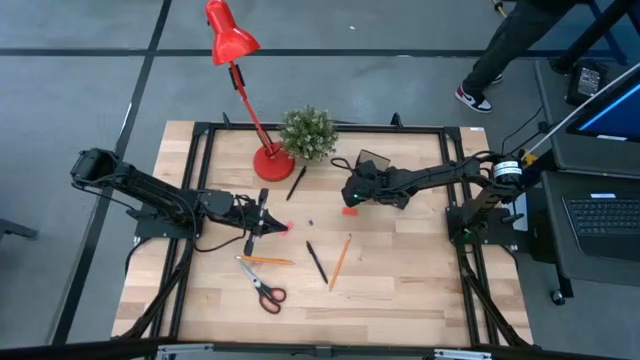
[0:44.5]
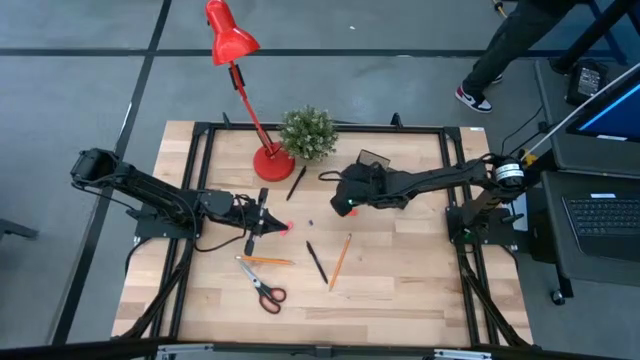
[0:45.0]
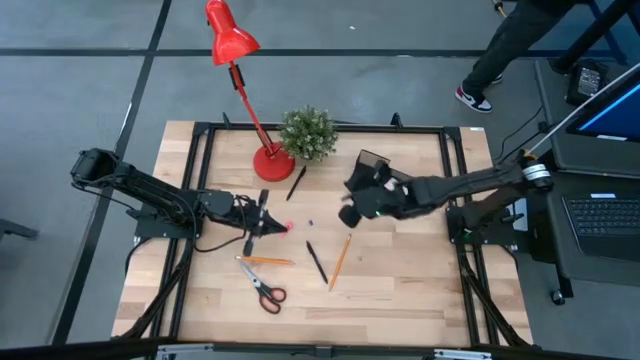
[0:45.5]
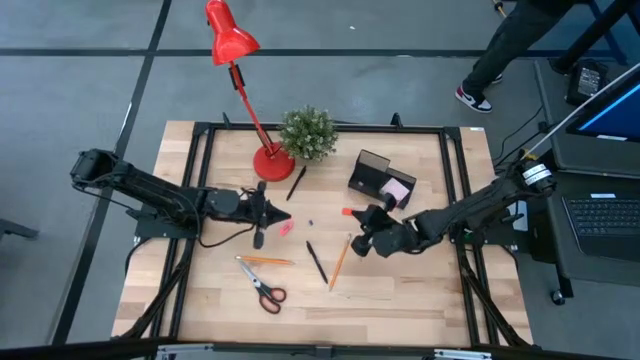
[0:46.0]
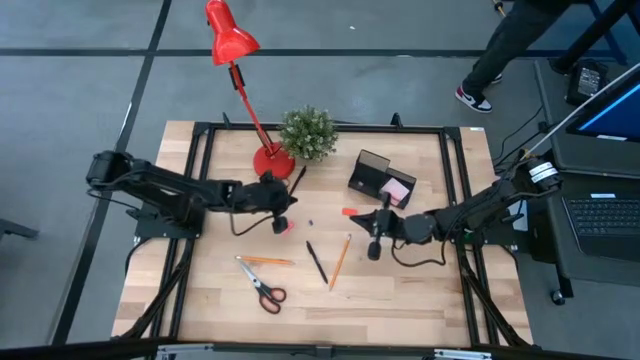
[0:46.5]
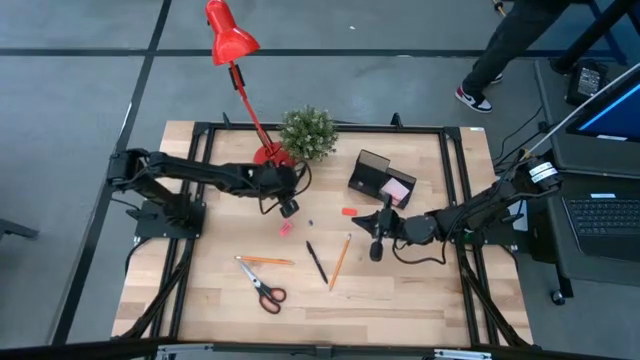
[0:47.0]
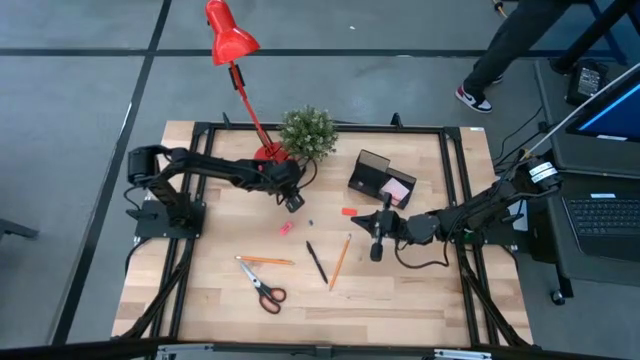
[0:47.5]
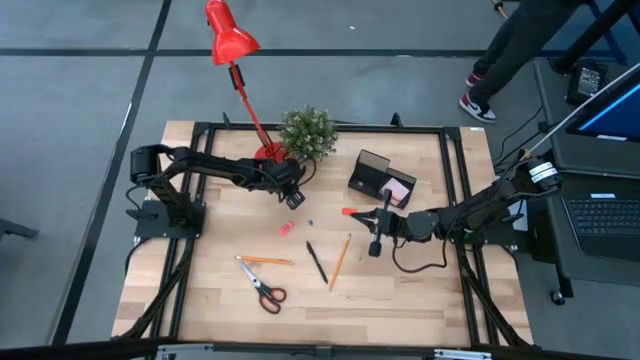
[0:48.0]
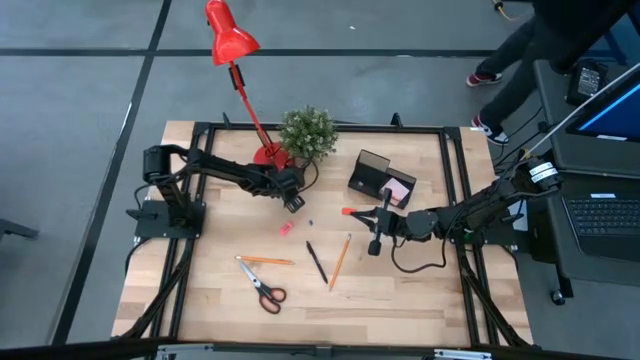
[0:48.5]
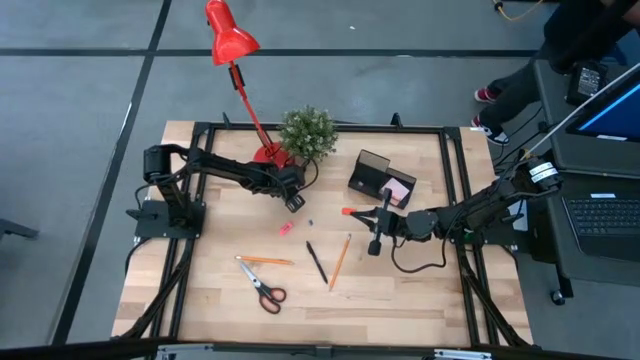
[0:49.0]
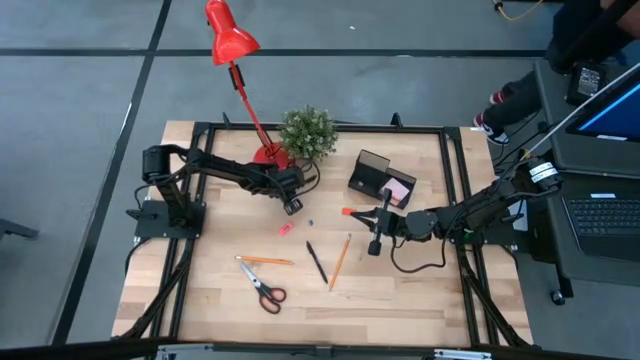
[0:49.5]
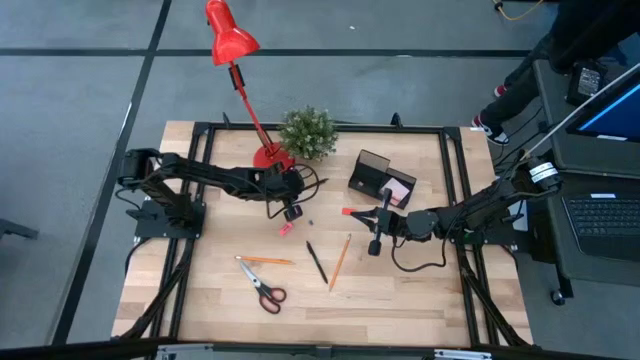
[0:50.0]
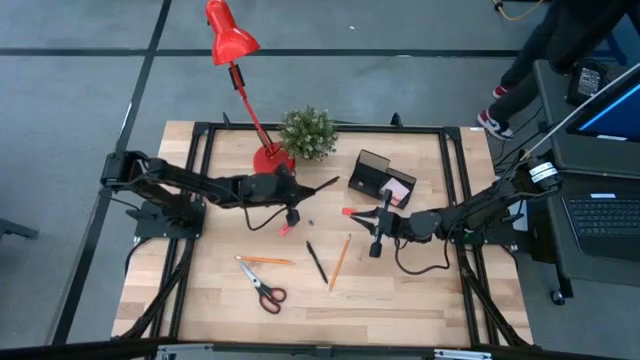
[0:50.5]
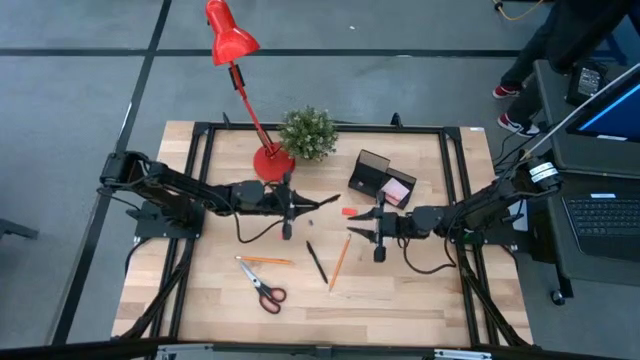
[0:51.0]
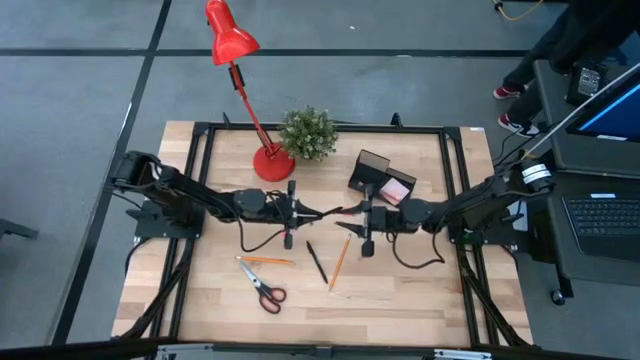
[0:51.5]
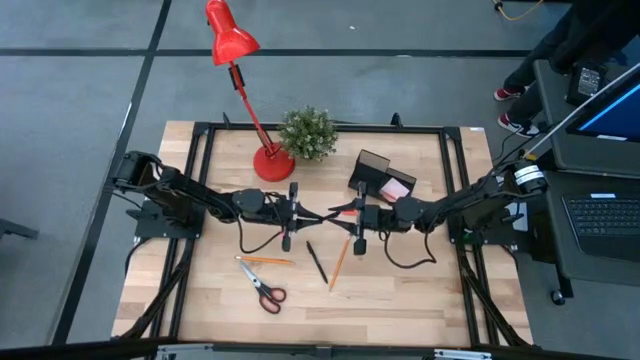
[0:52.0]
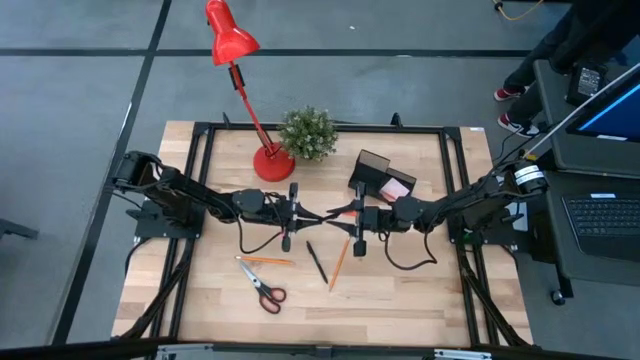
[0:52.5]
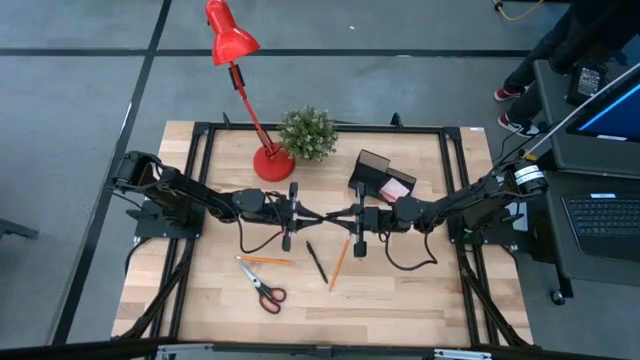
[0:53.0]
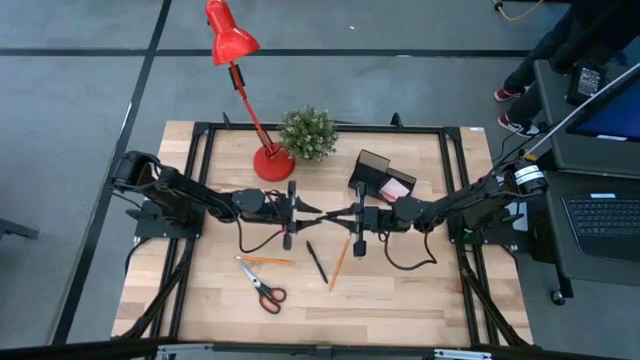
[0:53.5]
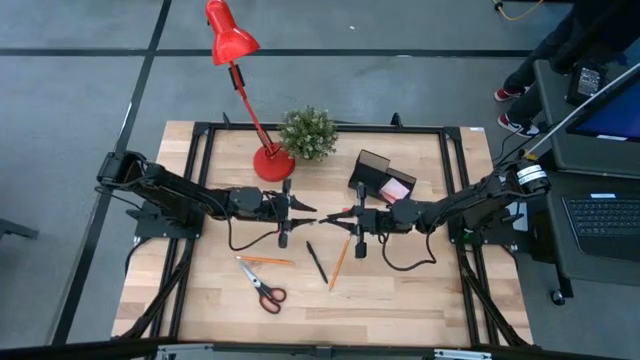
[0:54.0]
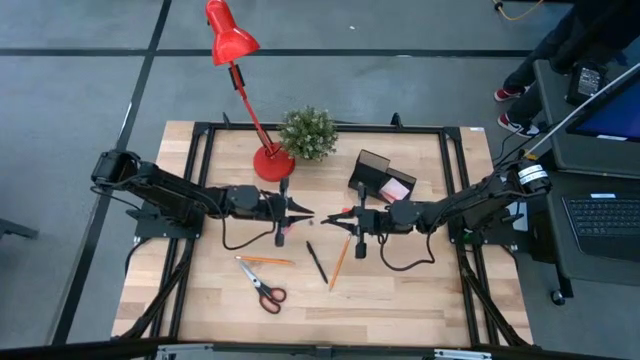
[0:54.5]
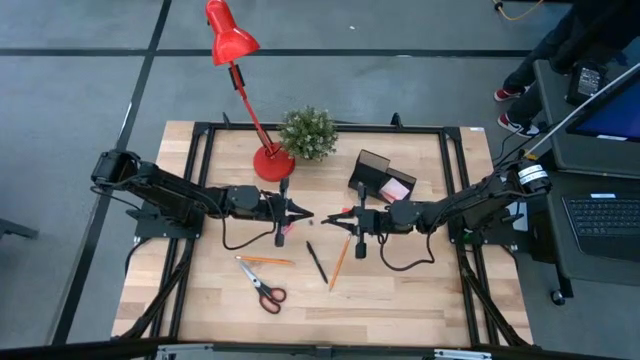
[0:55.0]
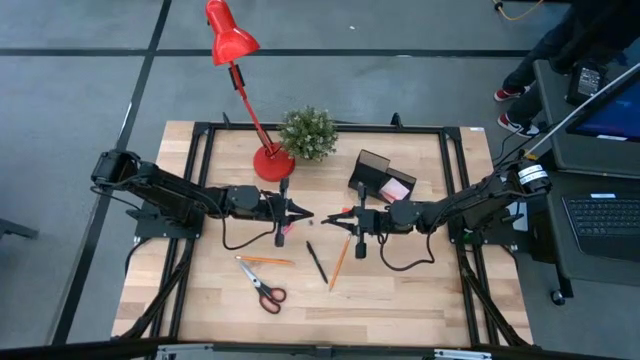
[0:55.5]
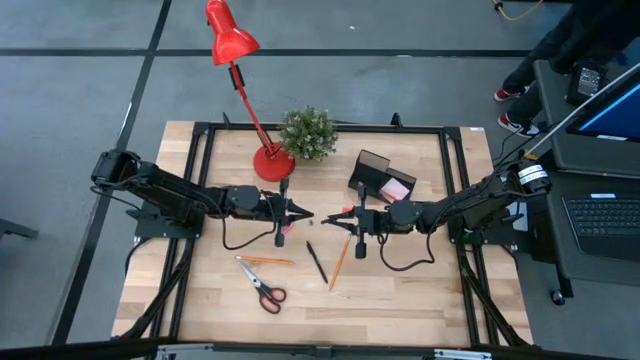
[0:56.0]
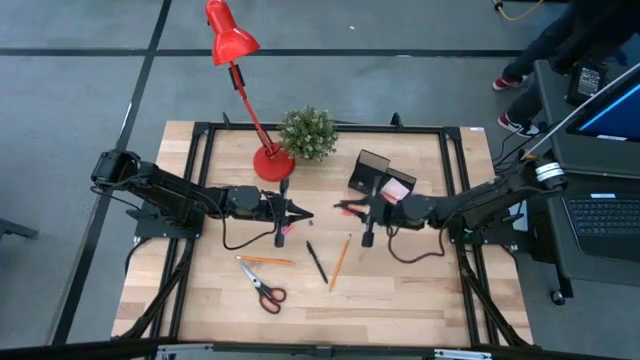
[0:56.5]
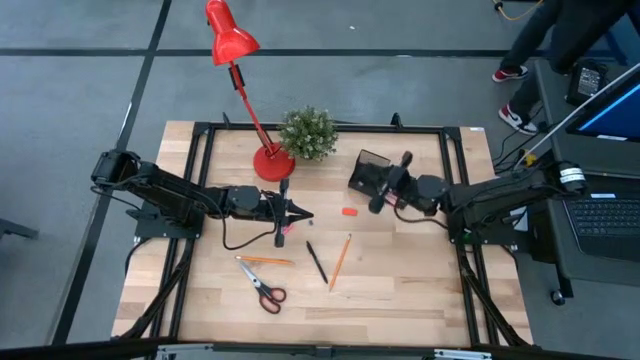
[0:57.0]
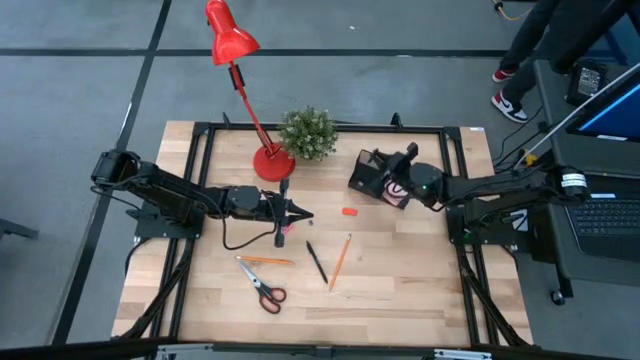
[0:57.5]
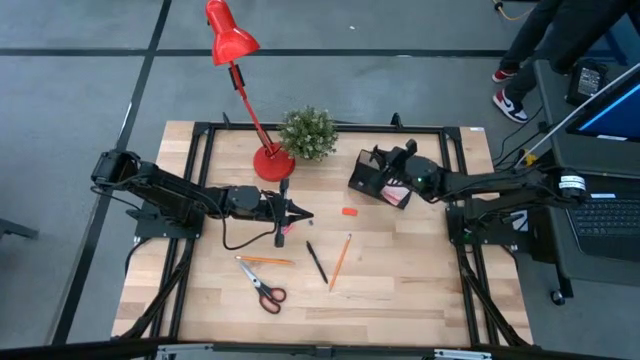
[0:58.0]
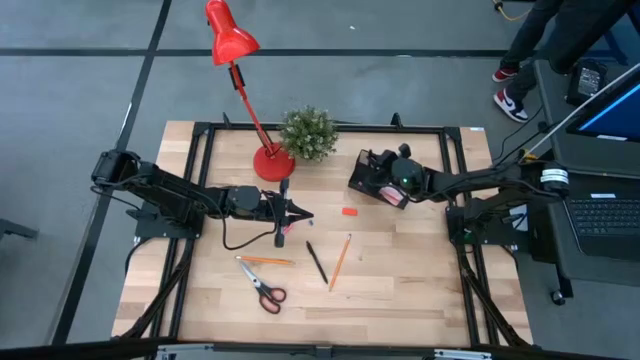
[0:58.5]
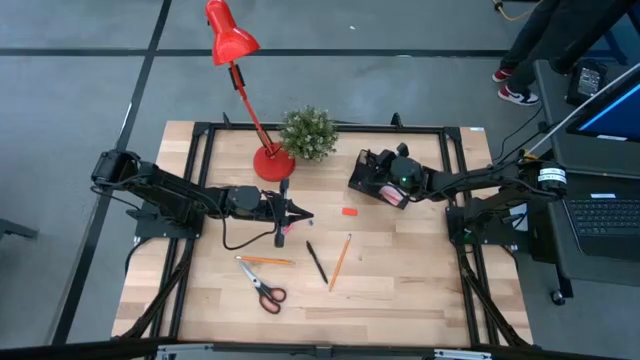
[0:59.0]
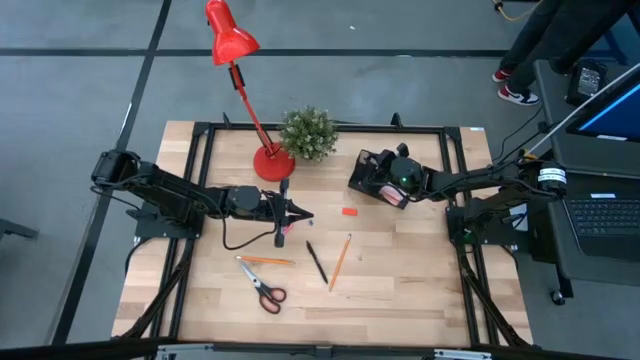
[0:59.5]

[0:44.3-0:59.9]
Task: Pick and place office supplies into organizer
Put the top black pen into the black desk organizer

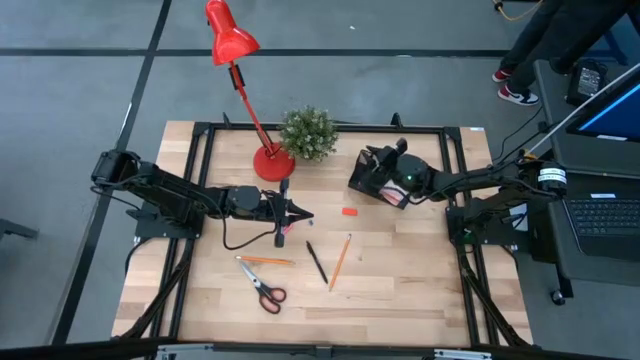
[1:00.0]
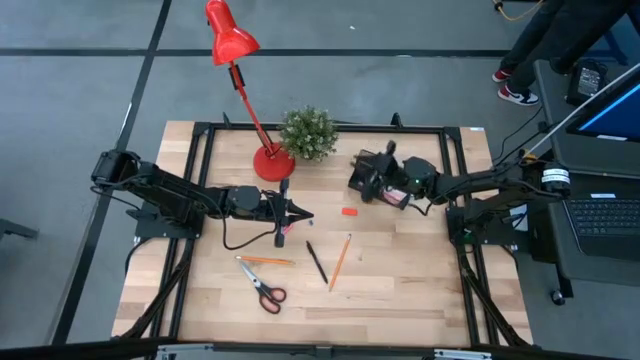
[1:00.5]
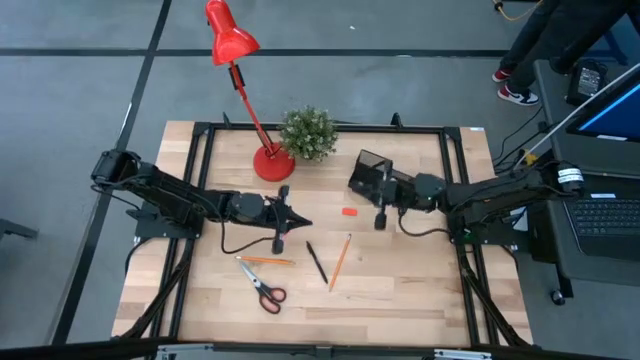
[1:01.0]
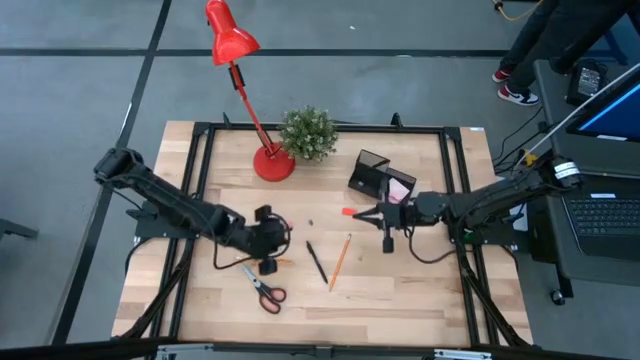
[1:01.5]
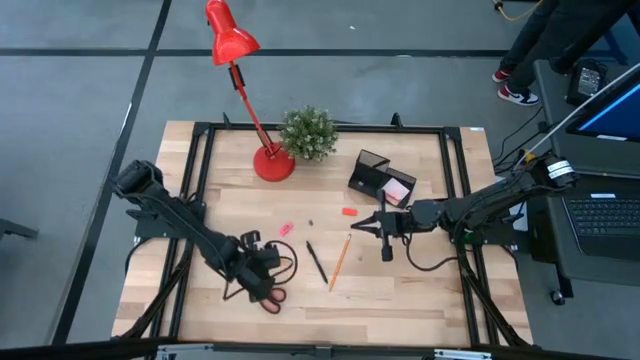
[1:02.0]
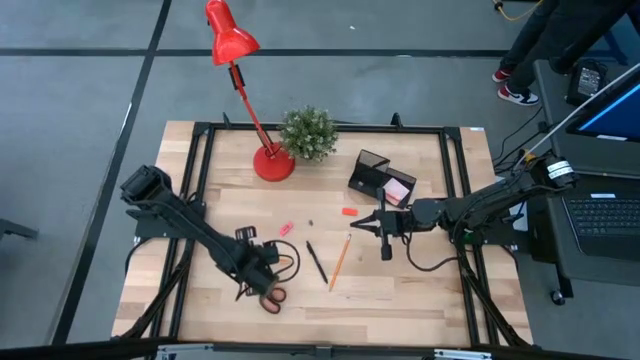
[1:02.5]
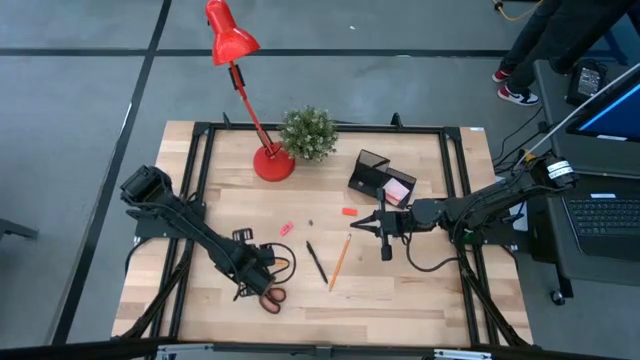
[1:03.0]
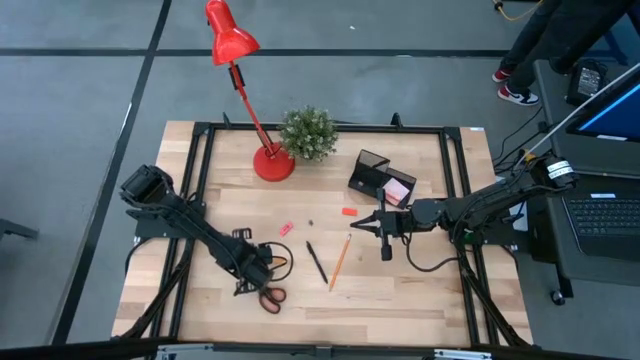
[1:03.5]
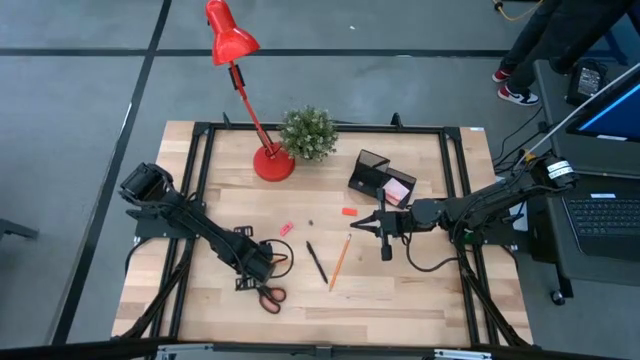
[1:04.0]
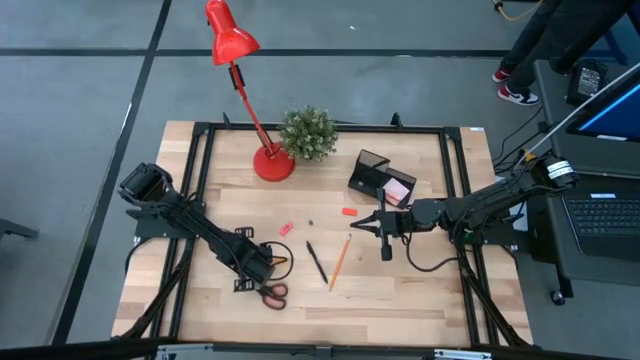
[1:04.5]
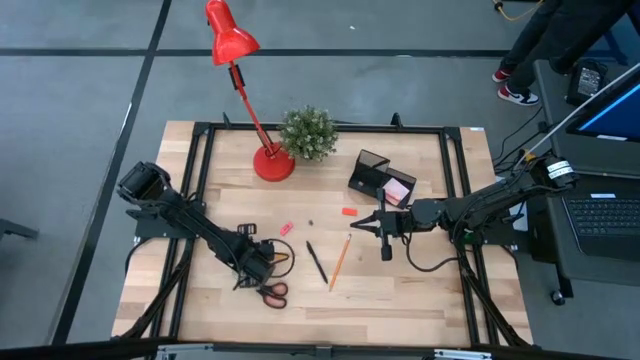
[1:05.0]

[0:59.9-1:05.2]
Put the left orange pencil into the black desk organizer
